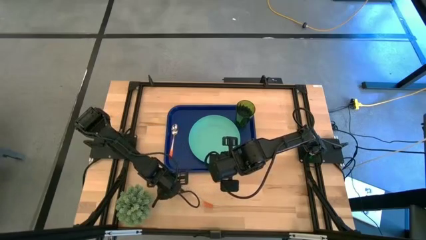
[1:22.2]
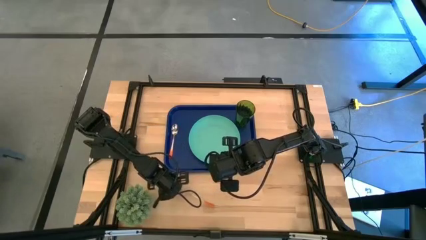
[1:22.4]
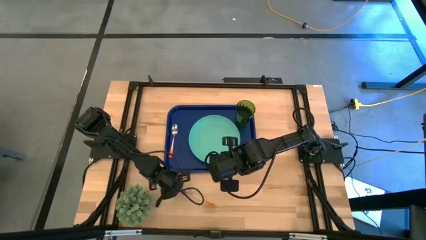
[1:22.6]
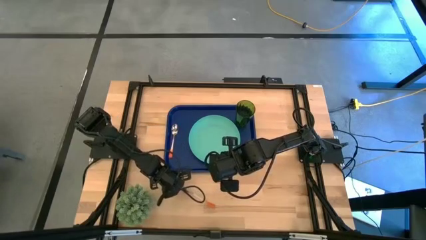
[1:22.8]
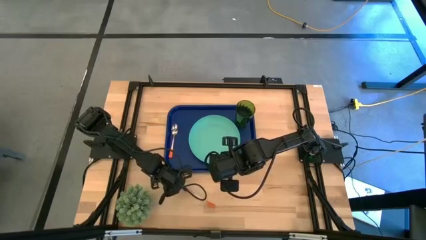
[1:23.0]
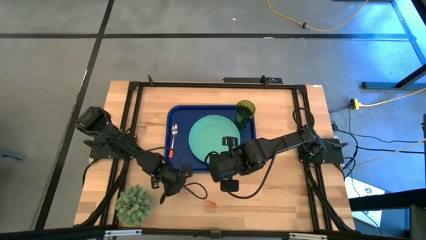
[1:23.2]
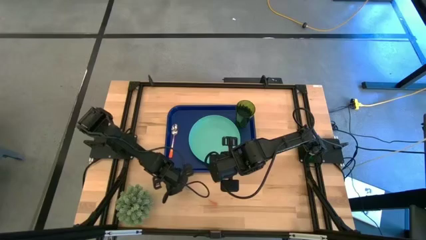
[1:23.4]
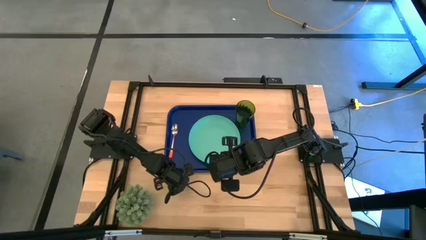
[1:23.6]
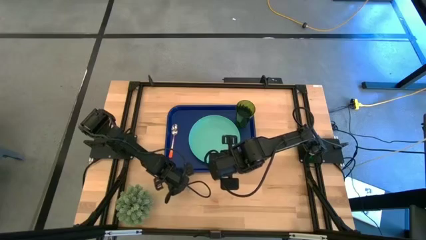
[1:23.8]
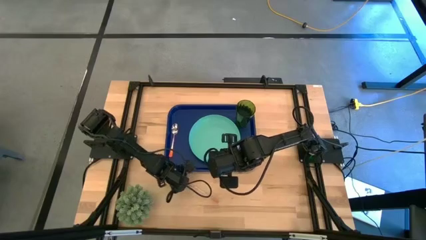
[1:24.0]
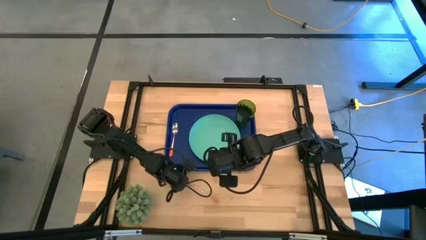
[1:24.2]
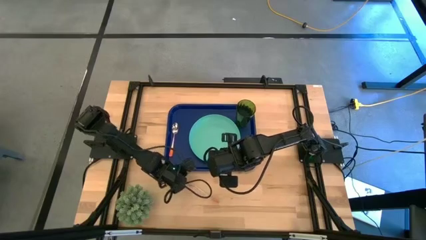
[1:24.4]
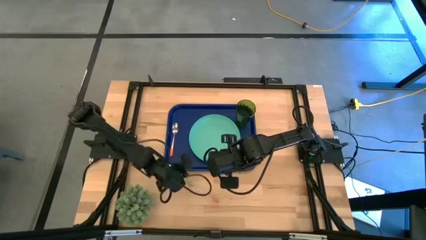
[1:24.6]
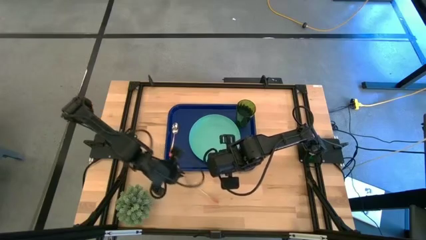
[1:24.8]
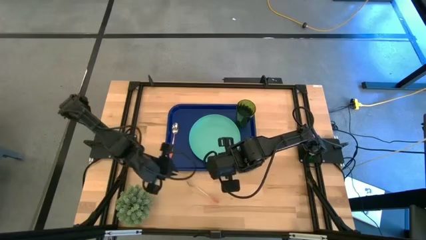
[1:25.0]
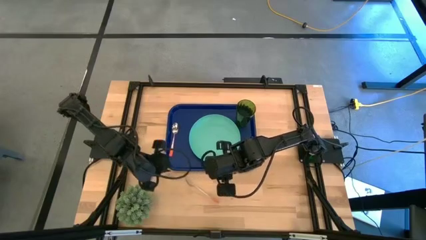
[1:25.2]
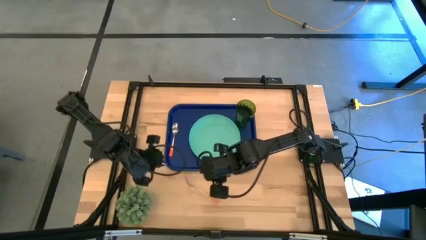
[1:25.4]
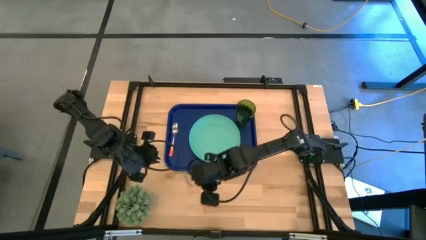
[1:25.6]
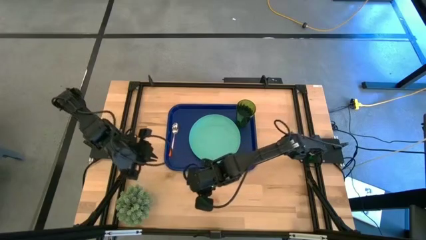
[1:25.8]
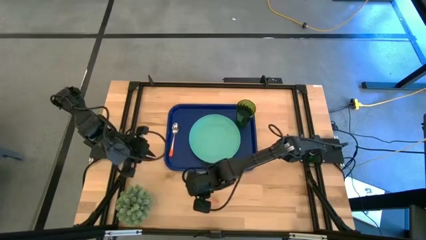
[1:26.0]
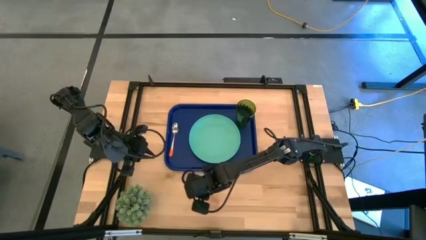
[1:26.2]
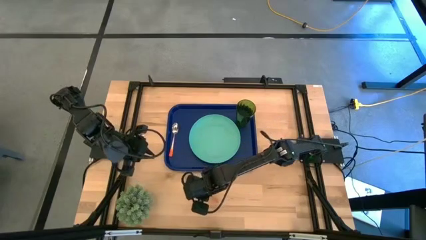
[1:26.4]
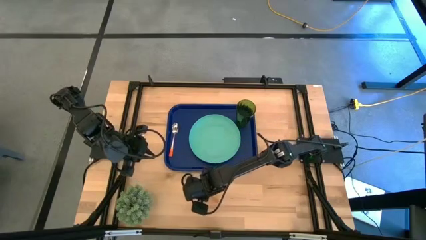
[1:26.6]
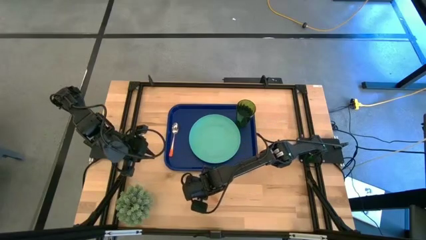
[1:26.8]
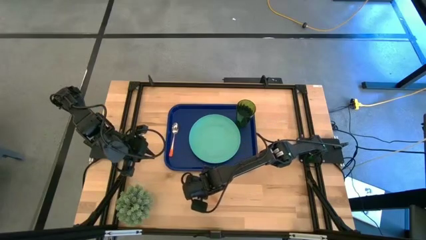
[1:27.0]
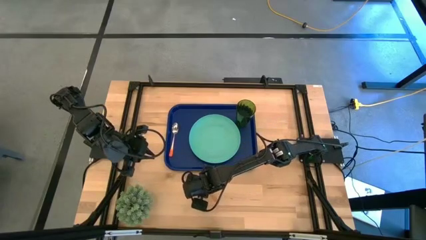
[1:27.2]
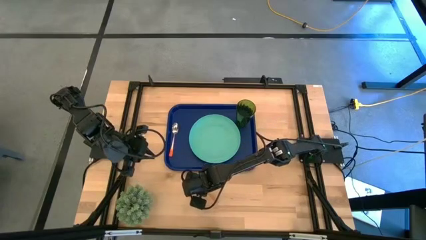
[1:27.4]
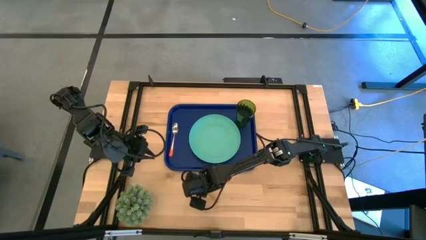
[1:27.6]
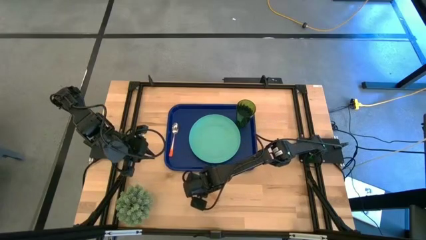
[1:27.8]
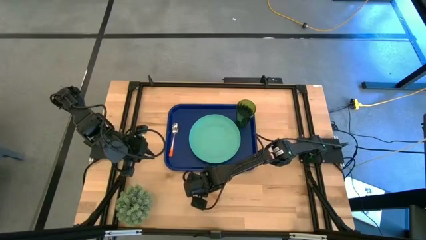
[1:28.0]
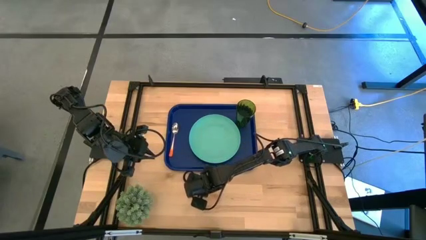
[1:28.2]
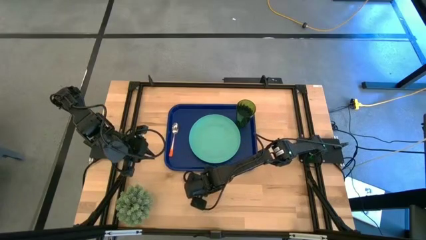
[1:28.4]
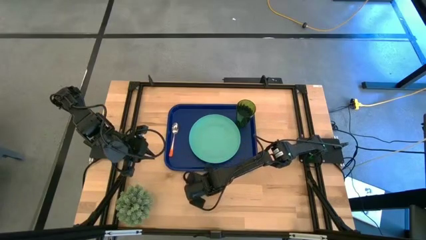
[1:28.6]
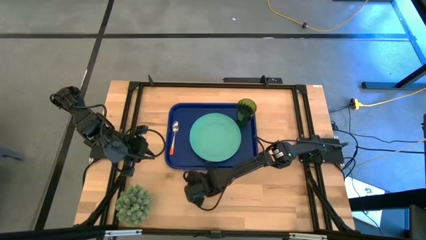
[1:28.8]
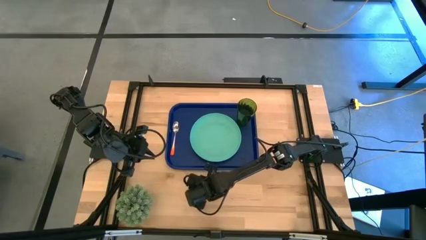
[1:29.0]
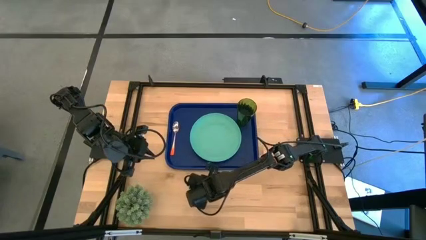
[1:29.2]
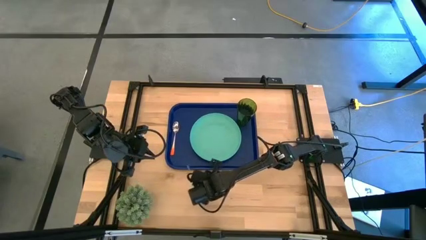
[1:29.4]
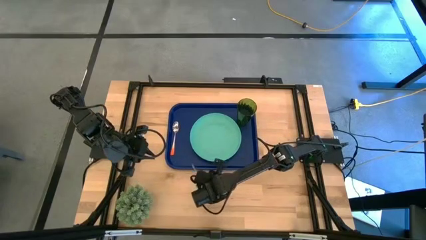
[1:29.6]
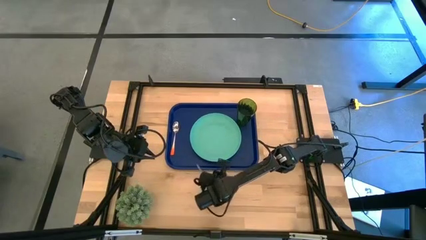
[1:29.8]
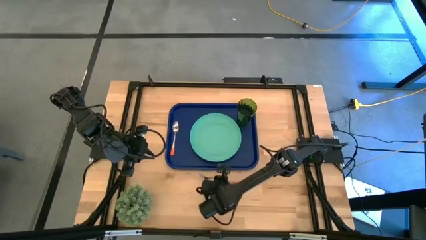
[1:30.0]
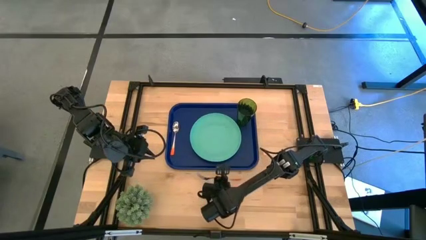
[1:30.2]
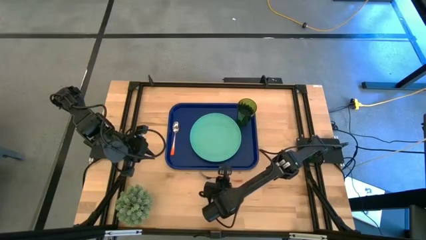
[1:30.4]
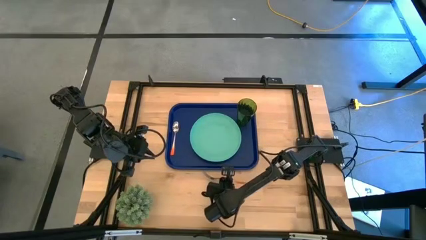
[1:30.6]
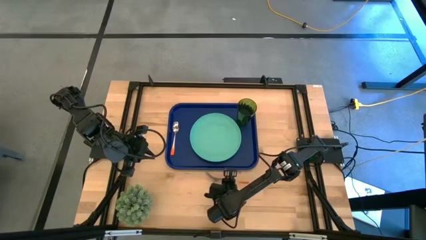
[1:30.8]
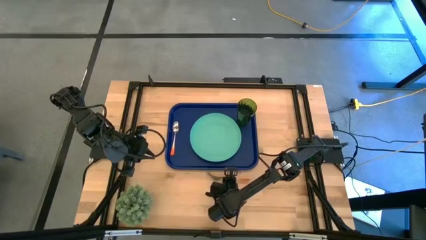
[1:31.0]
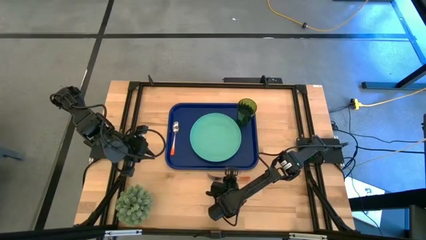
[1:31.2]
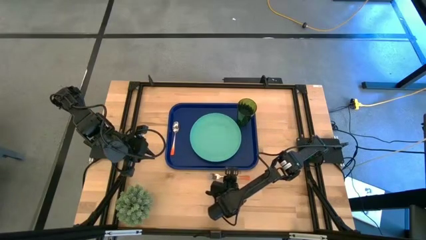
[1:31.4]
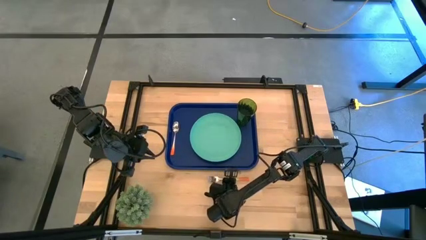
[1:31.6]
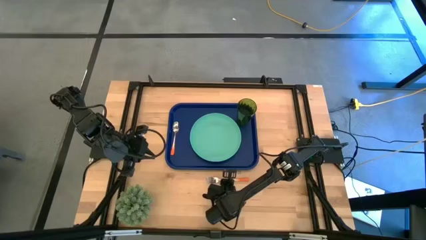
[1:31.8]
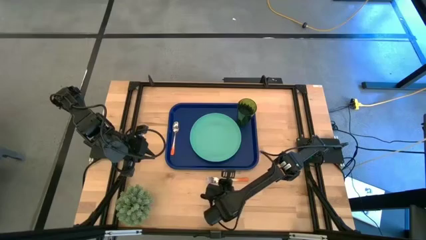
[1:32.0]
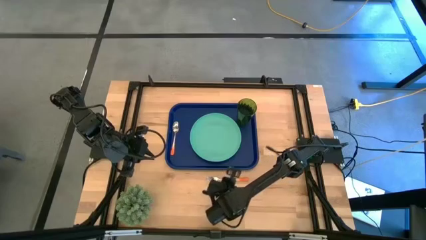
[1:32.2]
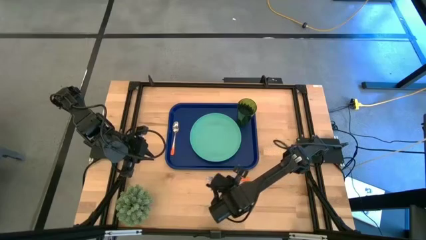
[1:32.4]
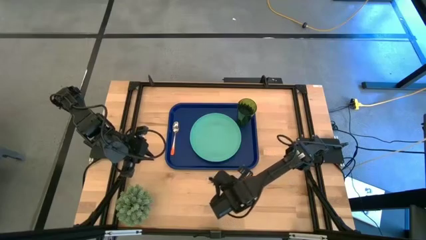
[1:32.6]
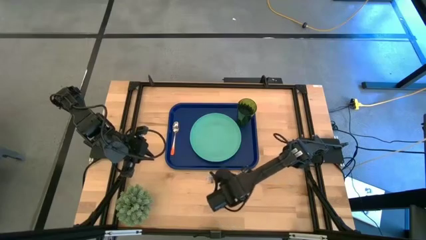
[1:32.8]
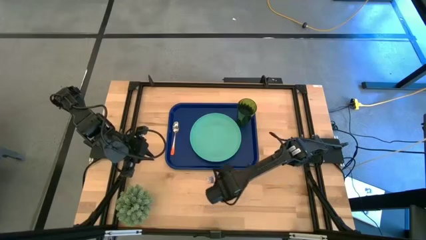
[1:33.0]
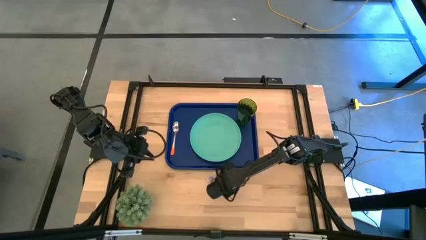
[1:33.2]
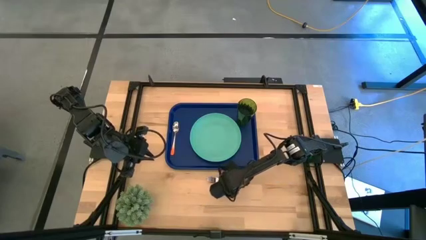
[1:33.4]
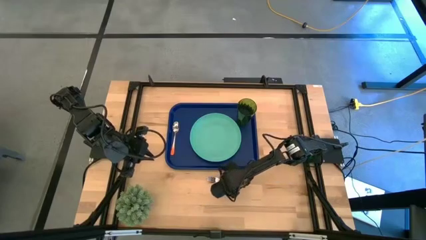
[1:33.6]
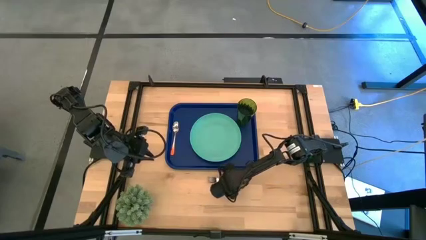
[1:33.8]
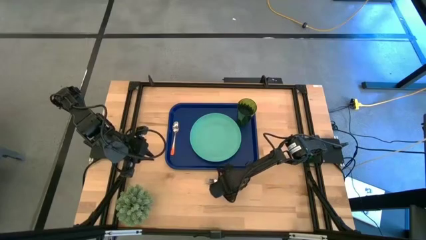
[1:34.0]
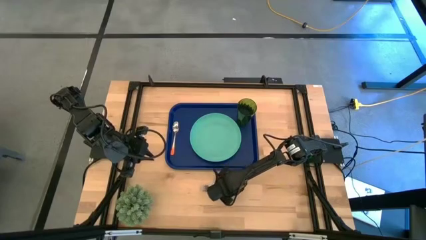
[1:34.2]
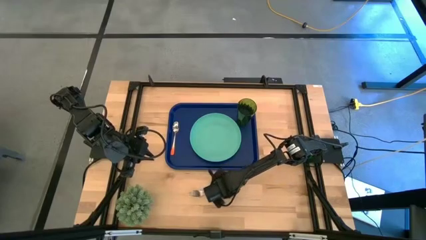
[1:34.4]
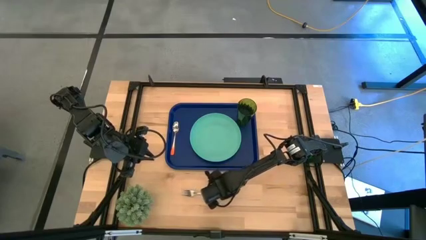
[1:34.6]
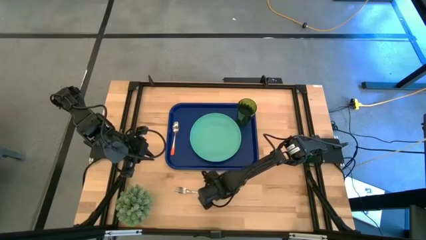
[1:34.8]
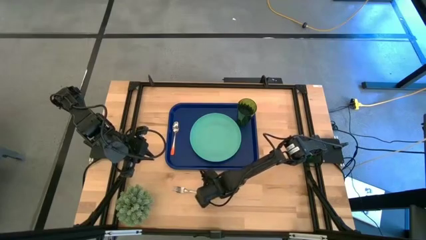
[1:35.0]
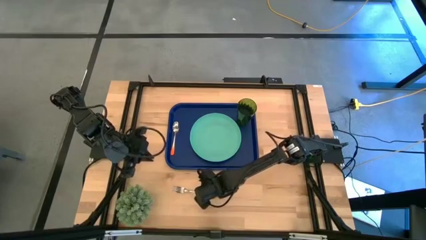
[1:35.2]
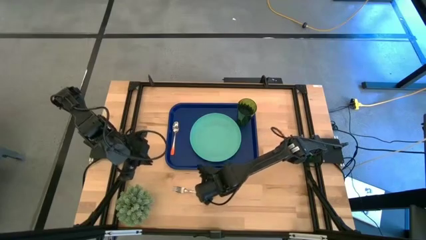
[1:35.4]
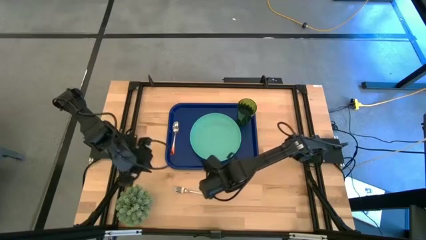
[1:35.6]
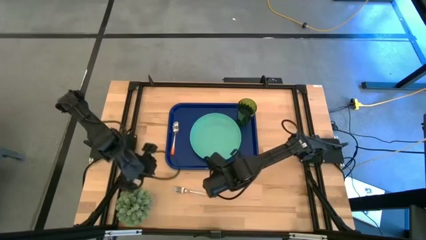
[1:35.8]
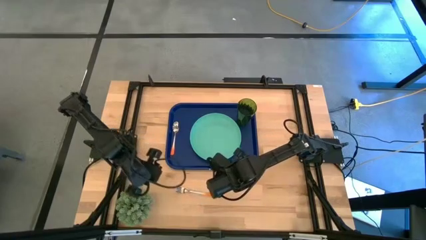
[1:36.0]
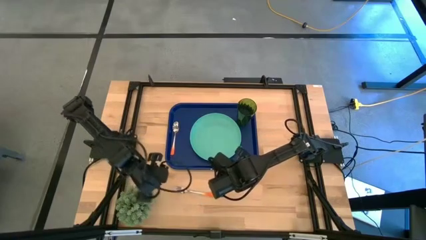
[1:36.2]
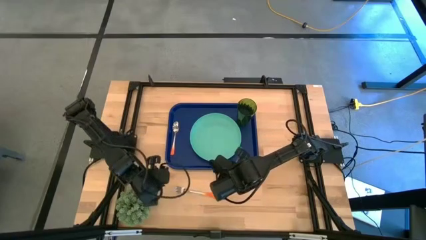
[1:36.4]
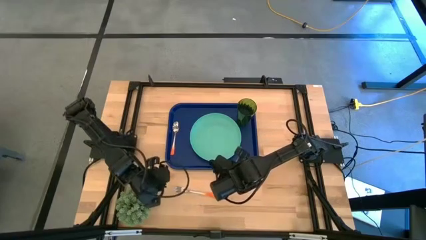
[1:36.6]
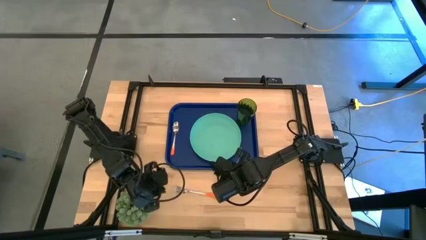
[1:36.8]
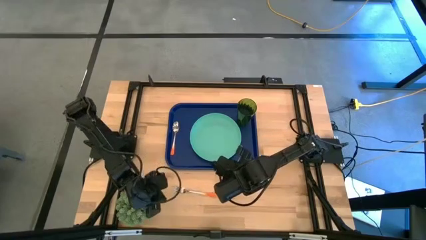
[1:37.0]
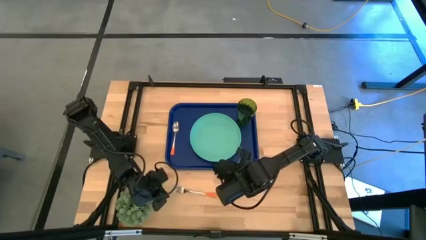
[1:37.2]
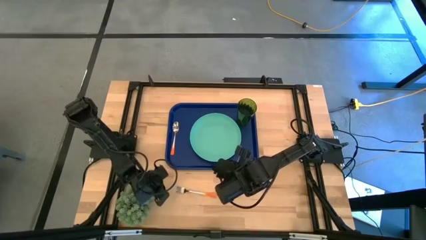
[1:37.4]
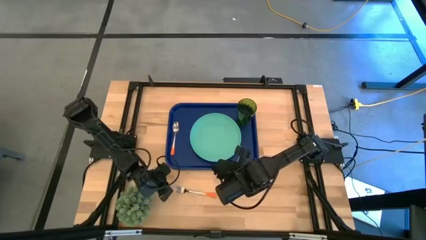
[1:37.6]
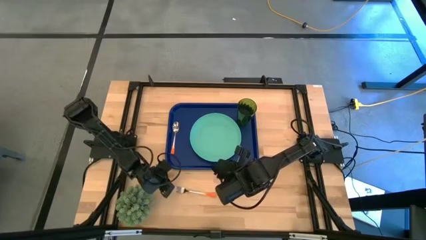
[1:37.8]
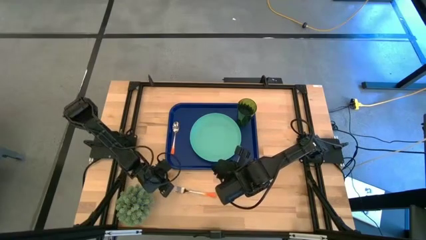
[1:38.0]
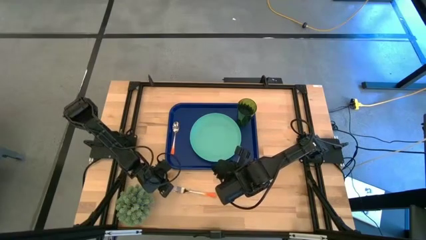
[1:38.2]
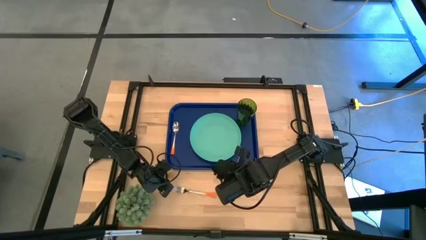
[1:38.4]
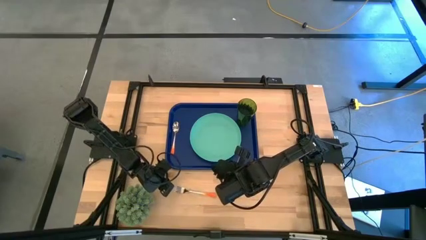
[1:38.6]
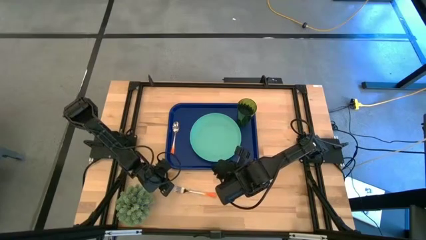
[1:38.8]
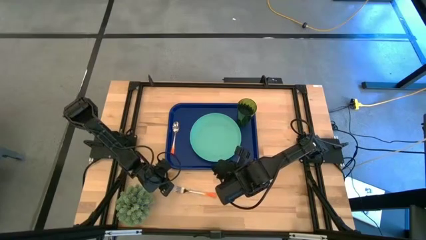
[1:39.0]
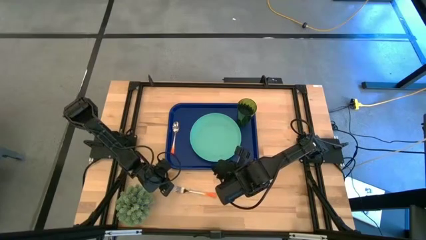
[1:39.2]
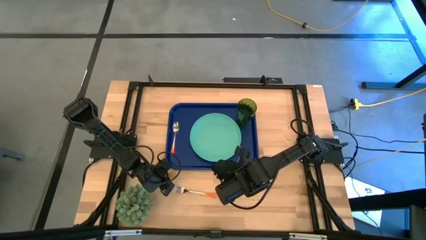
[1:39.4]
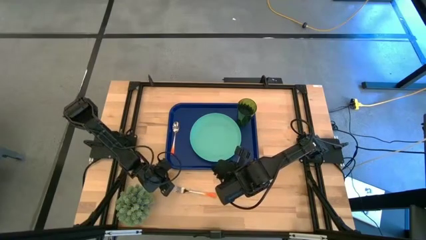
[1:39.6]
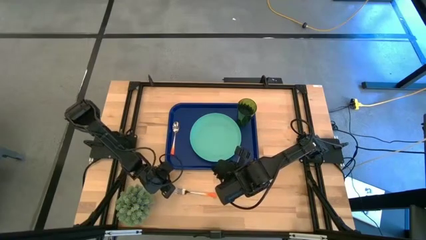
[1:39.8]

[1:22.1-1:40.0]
Task: Pick and place plate/cup/fork/spoon on tray
Put the orange fork on the blue serving tray to the left side of the green plate
